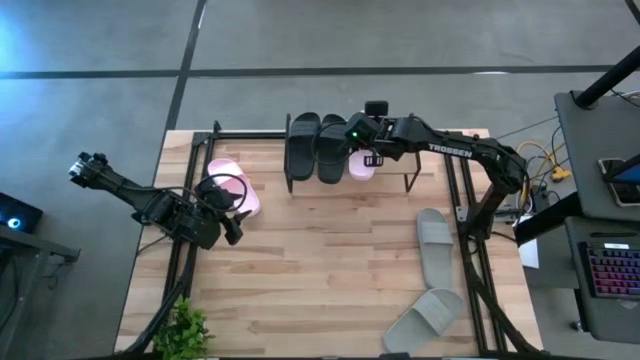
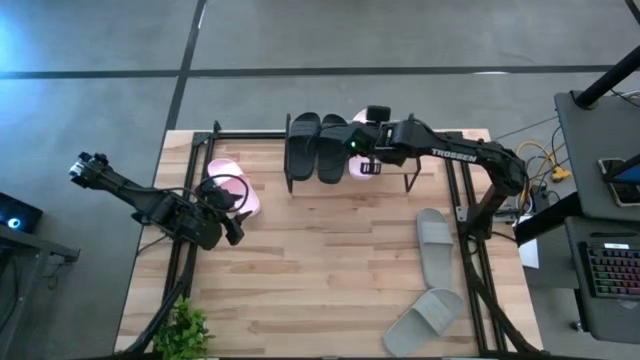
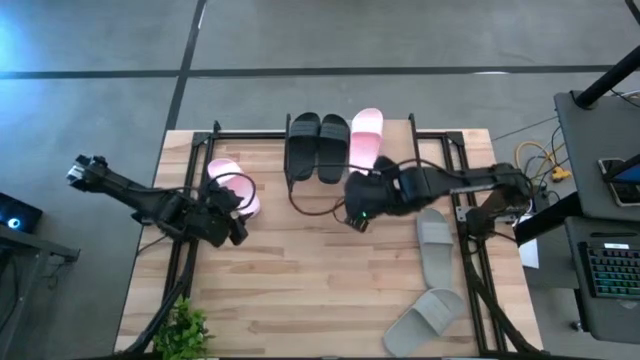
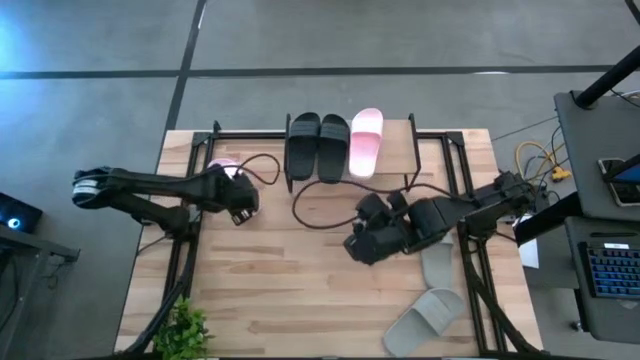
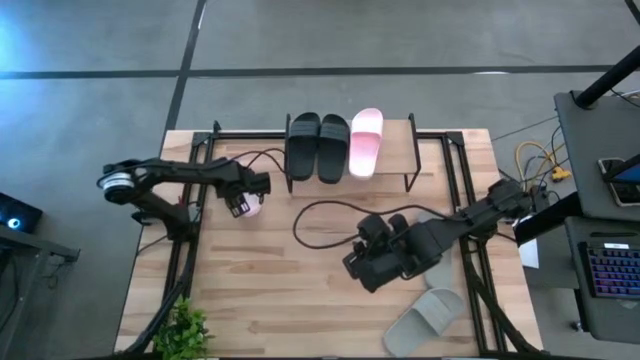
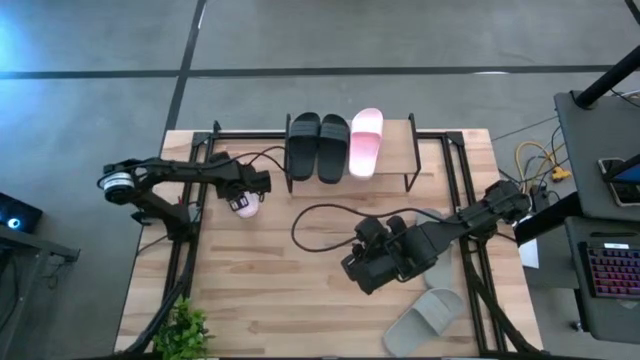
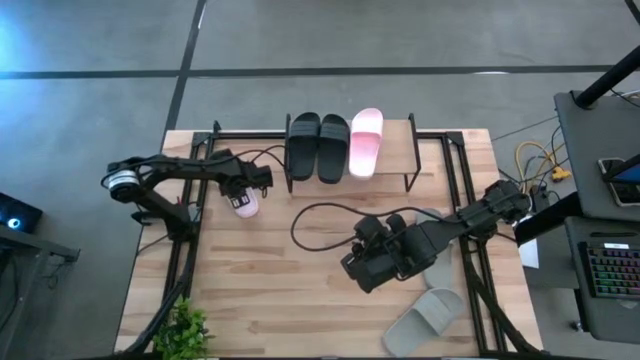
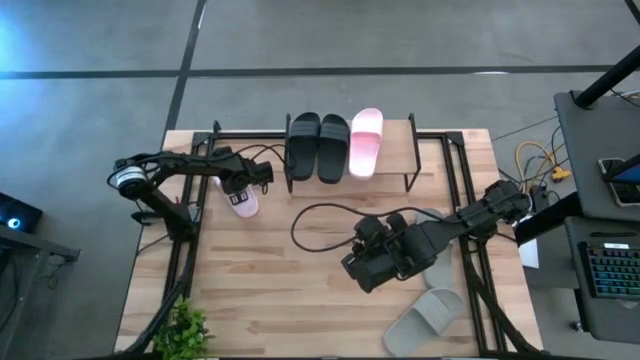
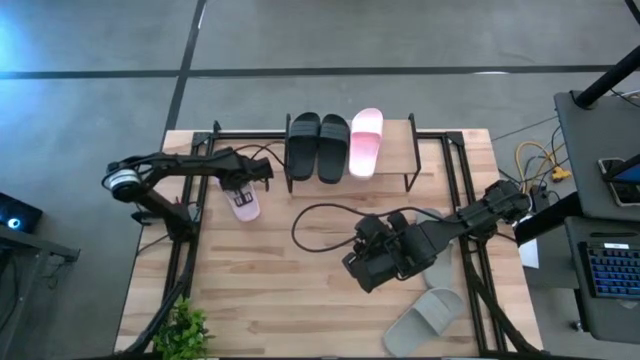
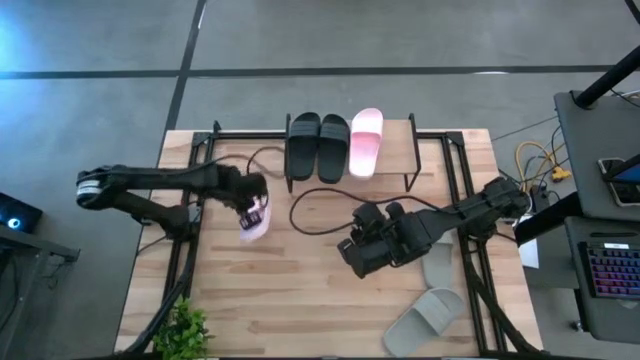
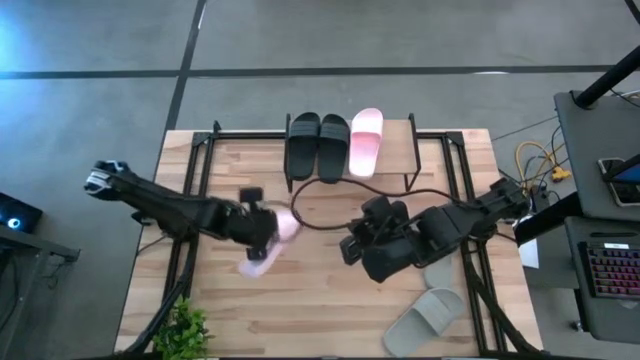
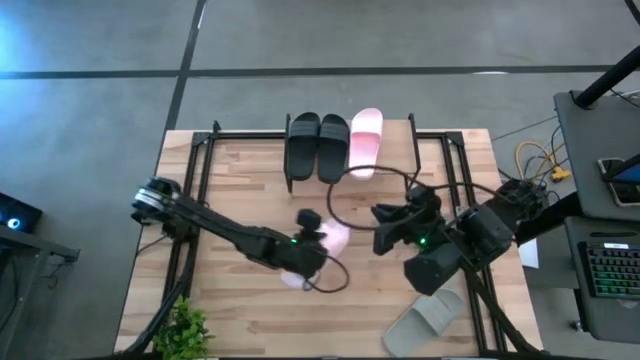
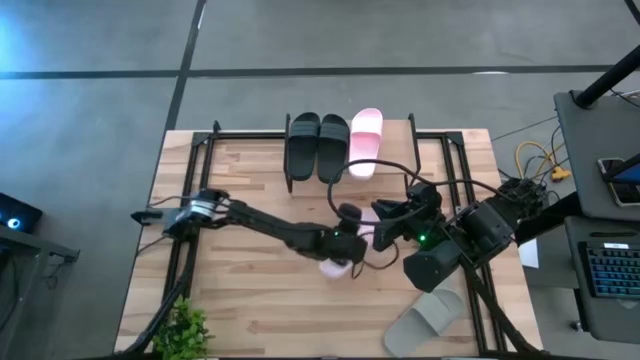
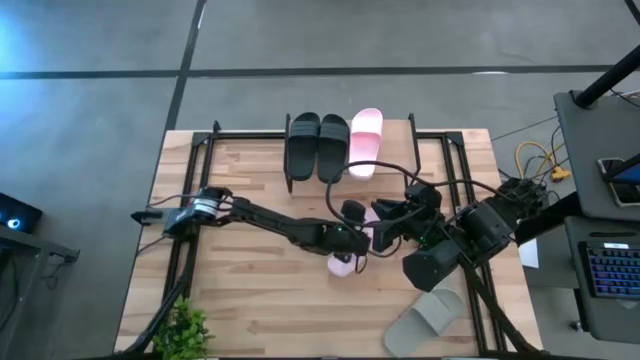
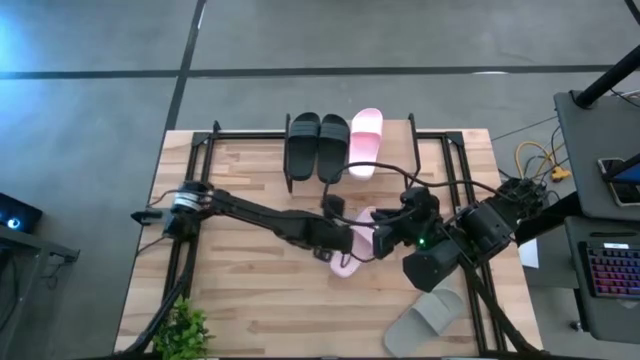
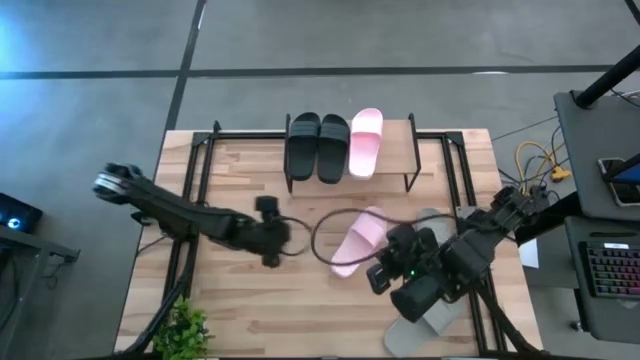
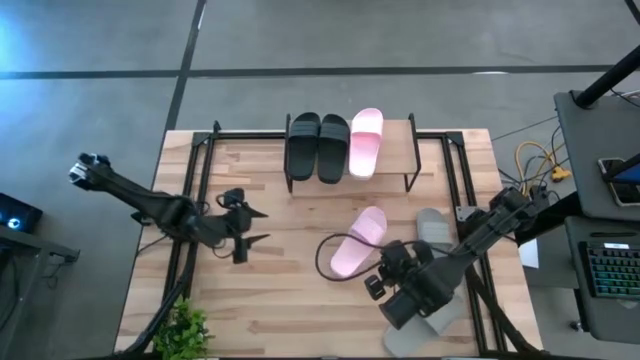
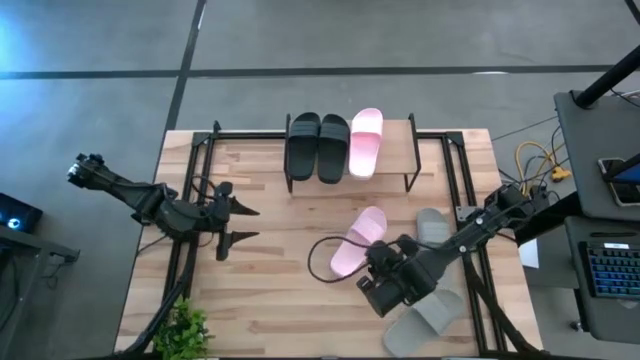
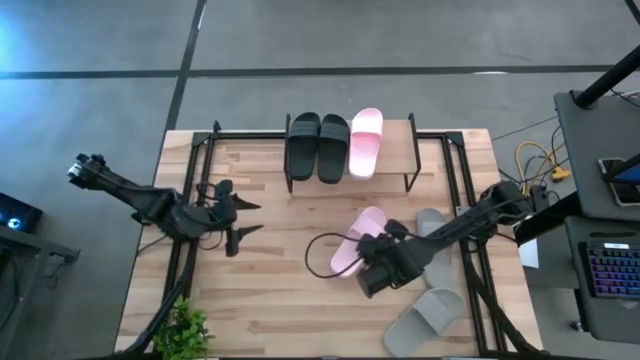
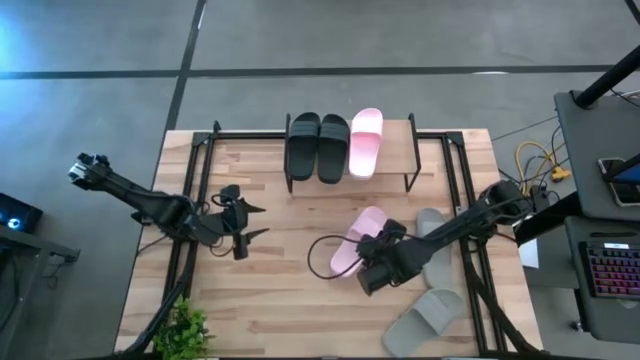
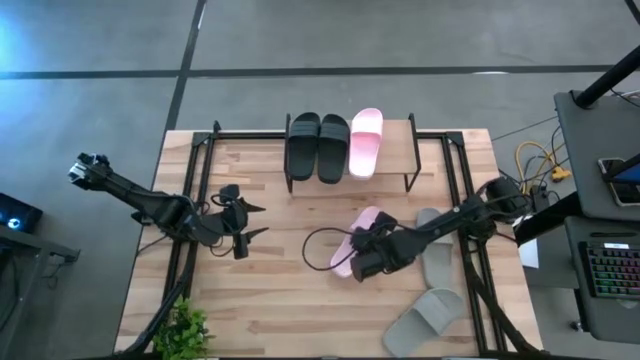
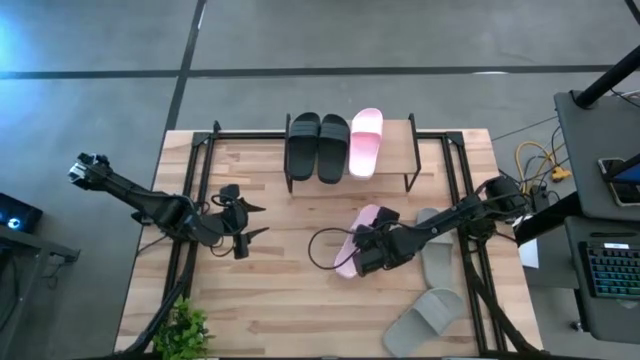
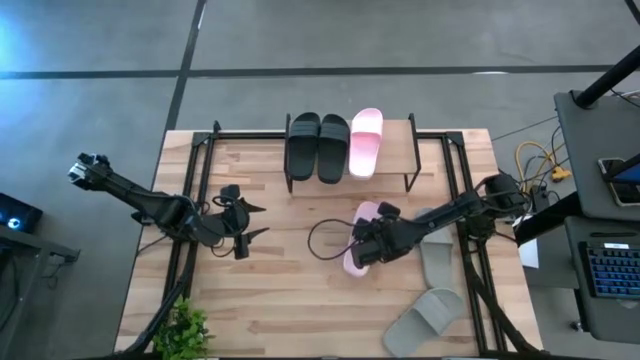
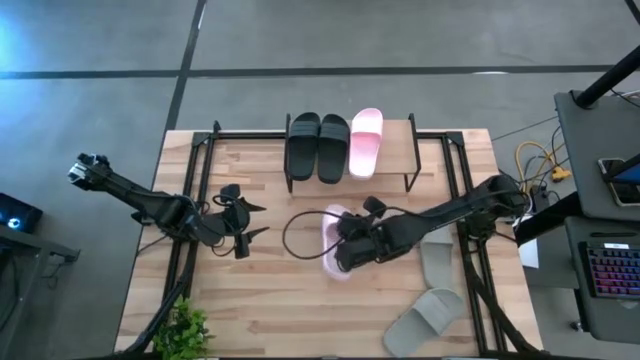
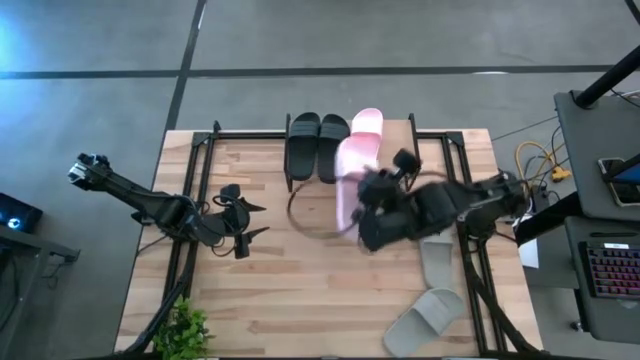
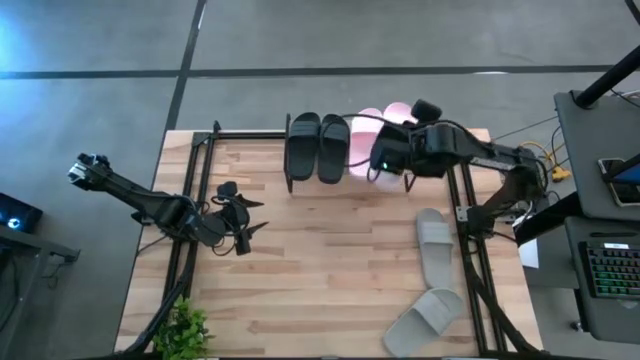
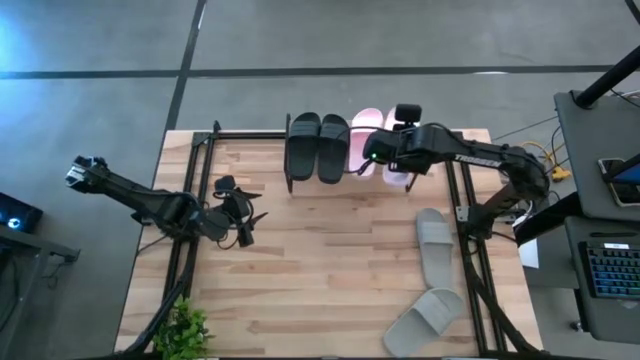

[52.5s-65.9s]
Task: Pick and place slides into the shelf
Put the pink slide on the shelf

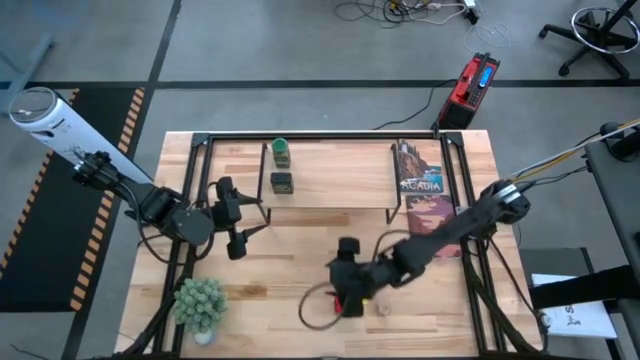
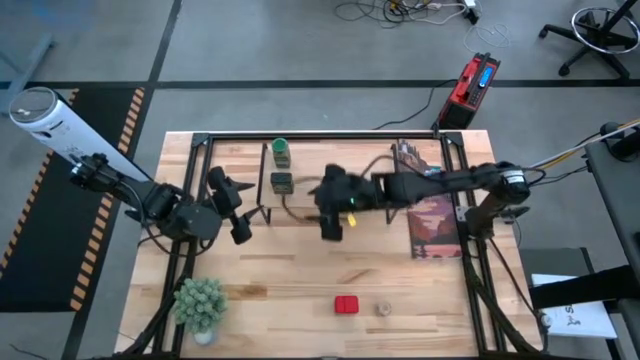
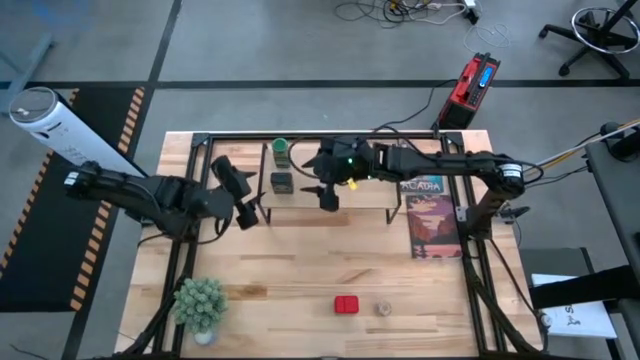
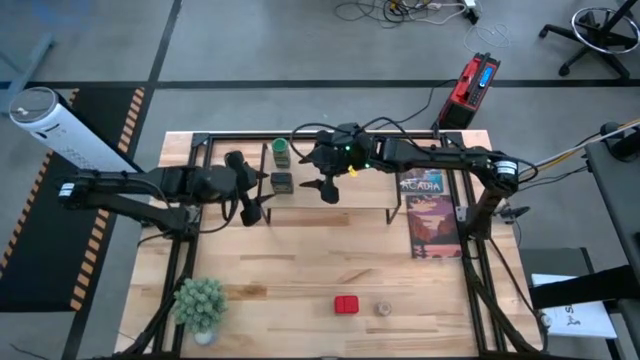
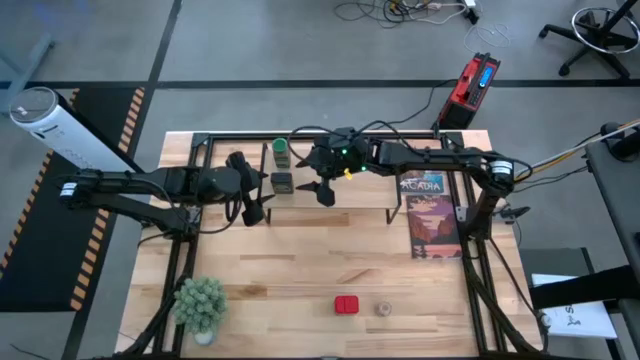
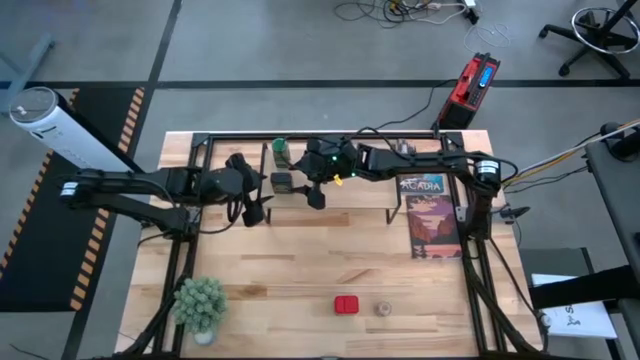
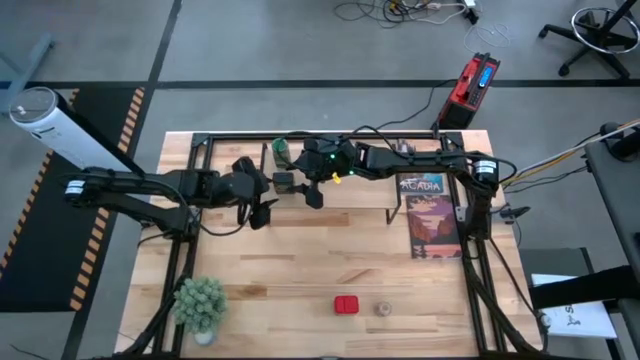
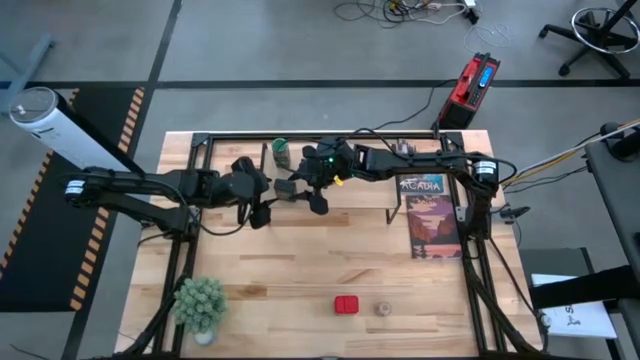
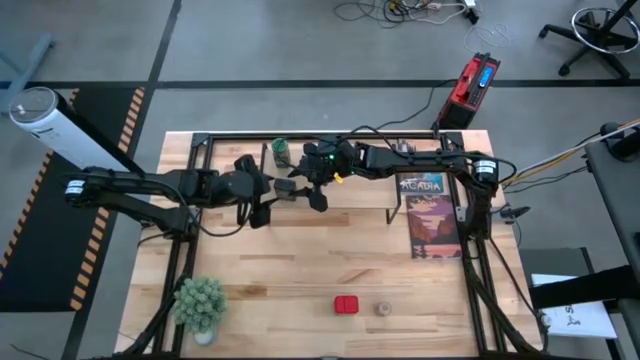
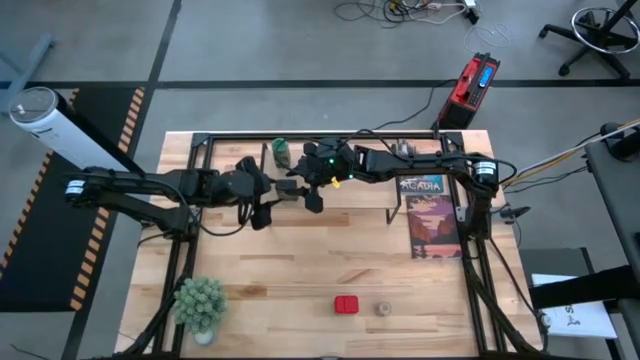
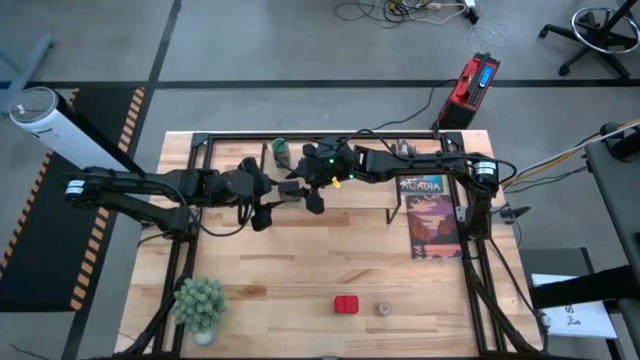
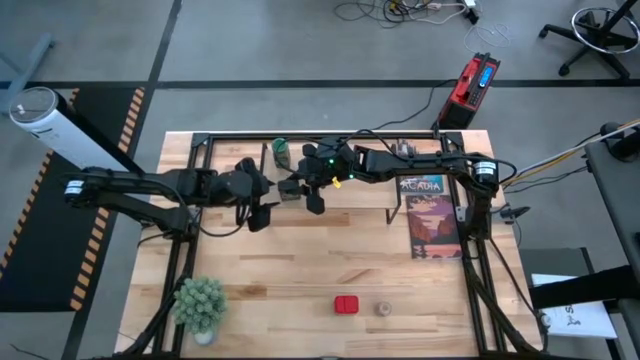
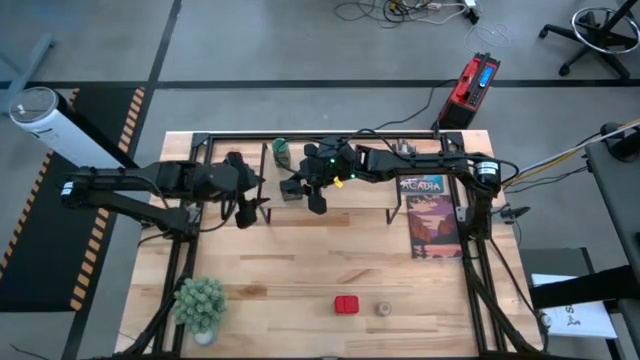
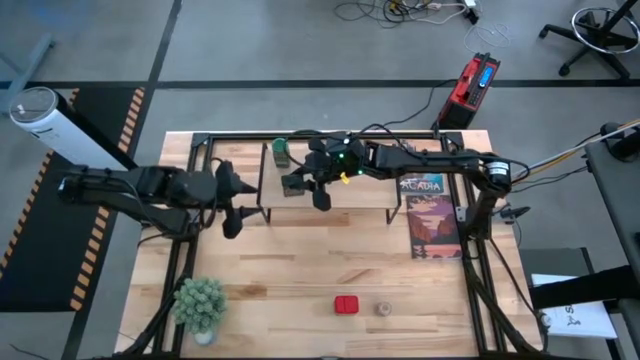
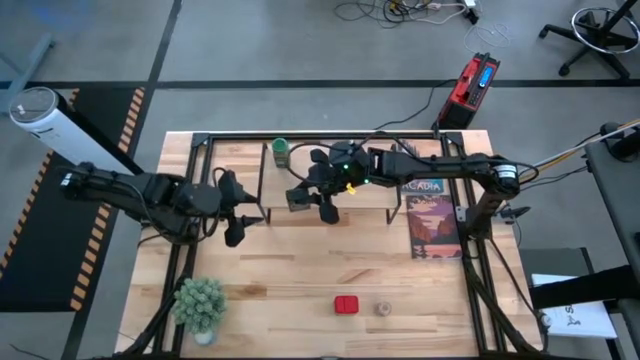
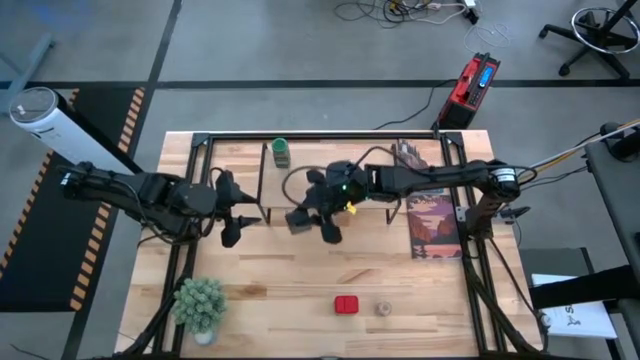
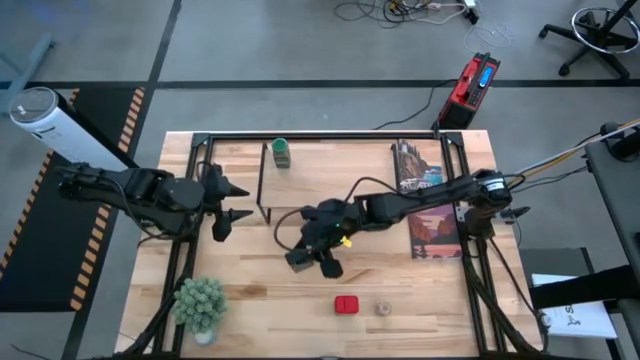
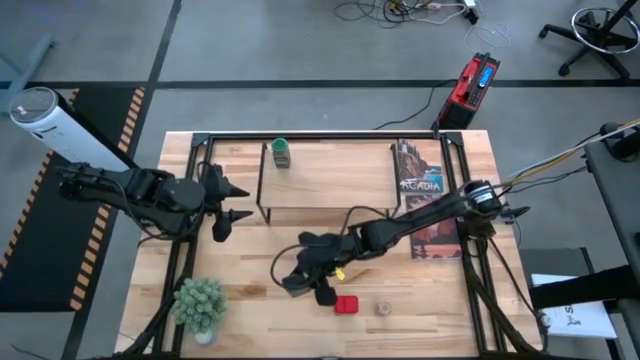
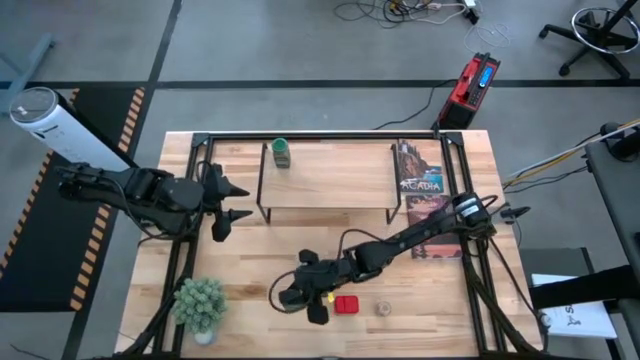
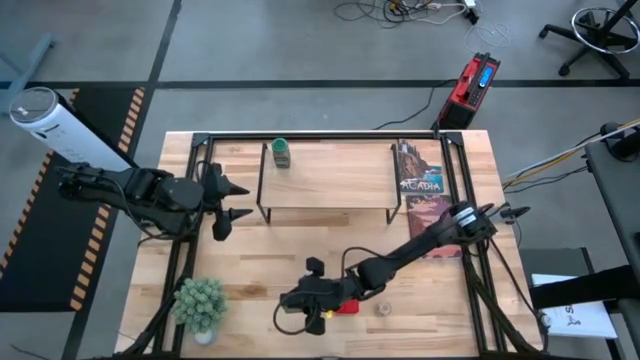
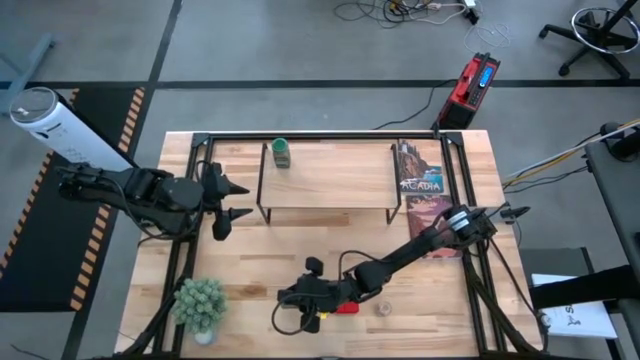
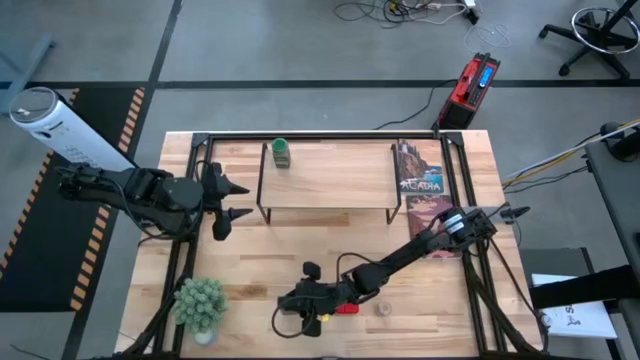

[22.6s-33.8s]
Task: Shelf spices
Remove the black seasoning can from the shelf
